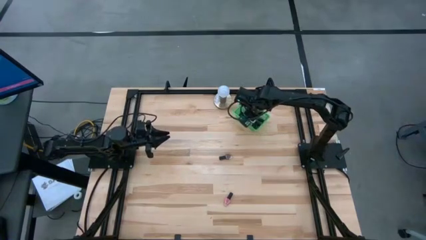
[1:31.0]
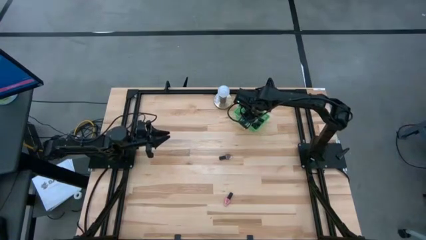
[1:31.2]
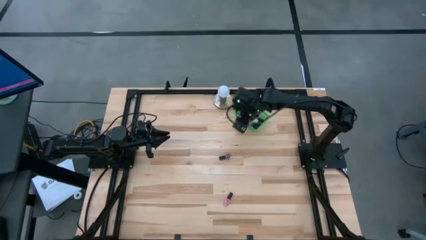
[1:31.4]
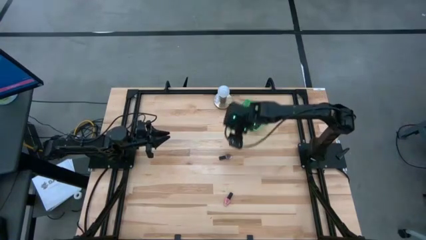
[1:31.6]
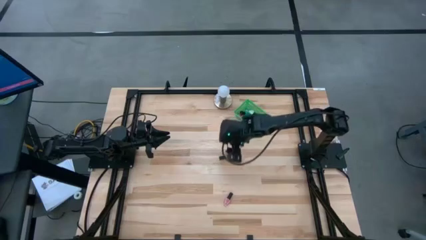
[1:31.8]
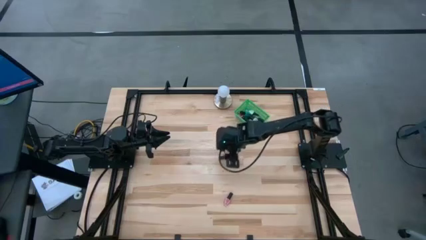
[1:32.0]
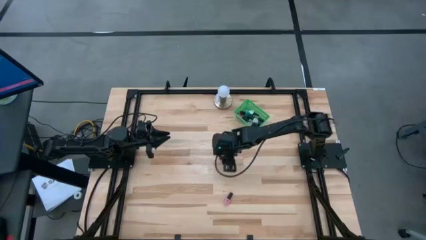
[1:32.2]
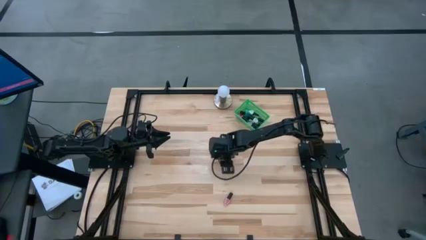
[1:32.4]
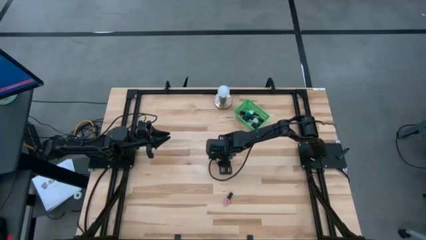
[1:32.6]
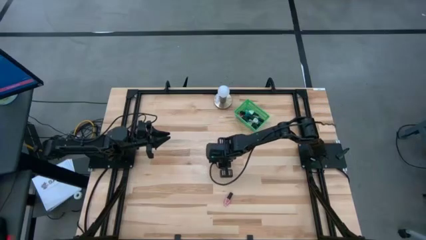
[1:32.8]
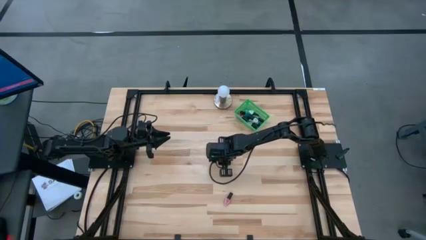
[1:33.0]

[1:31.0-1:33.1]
Task: Pick & Place Nail Polish
Put the brown nail polish bottle into the green bin

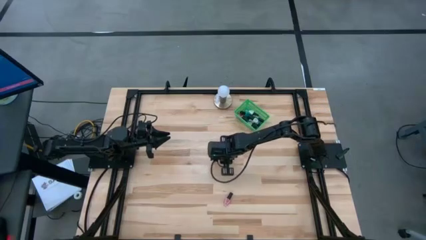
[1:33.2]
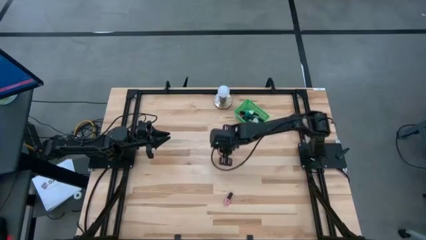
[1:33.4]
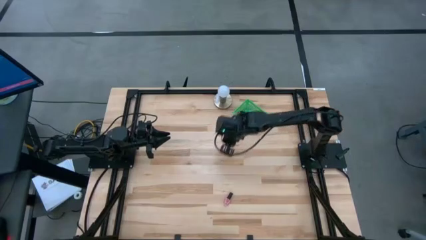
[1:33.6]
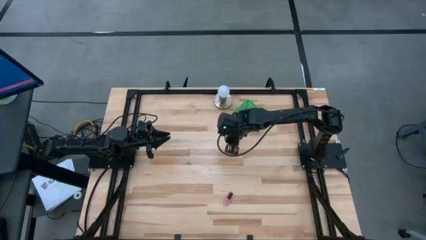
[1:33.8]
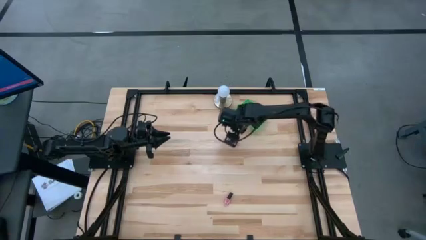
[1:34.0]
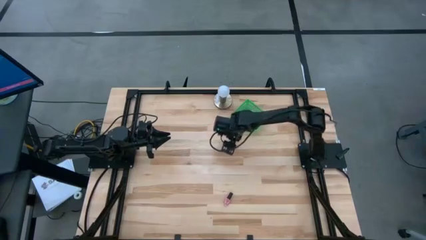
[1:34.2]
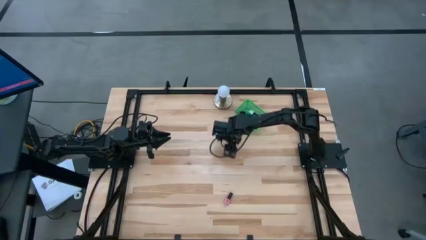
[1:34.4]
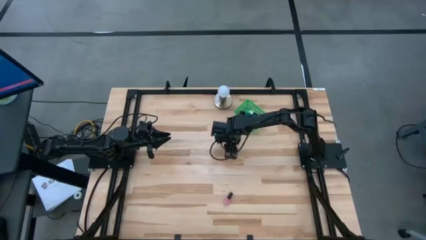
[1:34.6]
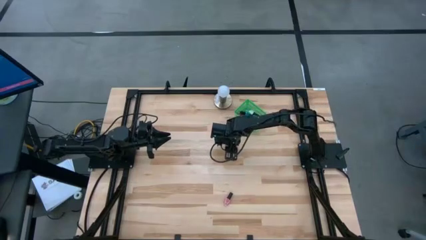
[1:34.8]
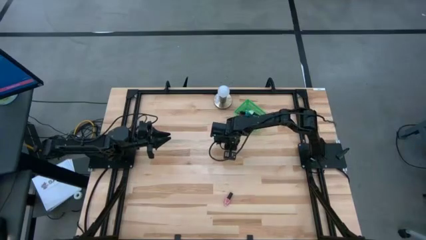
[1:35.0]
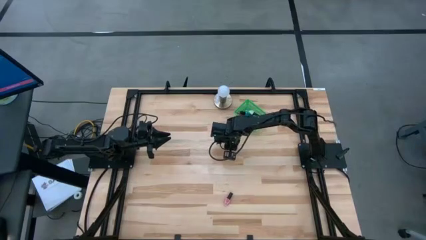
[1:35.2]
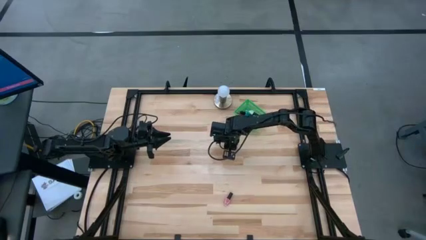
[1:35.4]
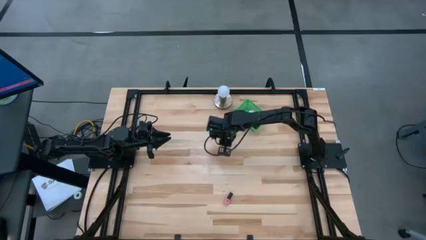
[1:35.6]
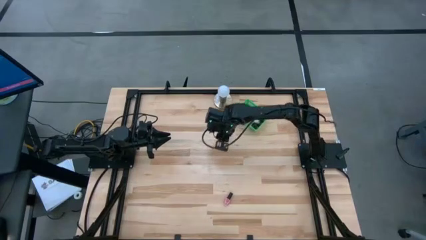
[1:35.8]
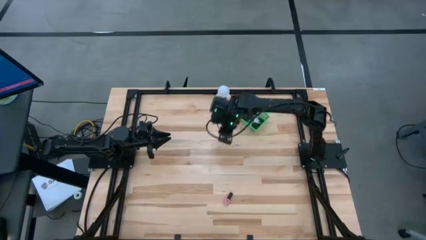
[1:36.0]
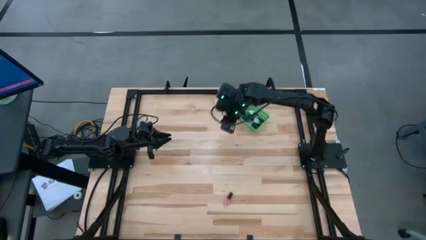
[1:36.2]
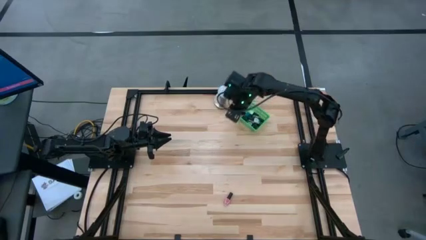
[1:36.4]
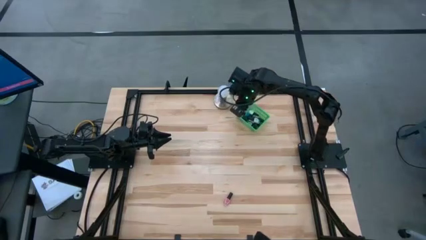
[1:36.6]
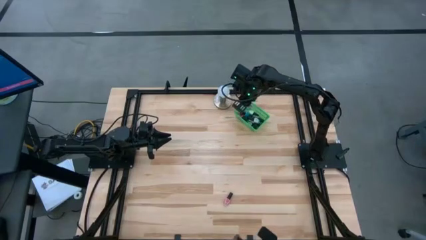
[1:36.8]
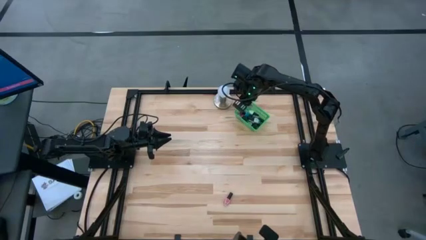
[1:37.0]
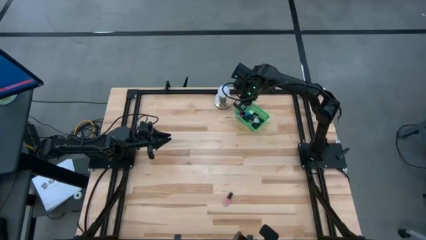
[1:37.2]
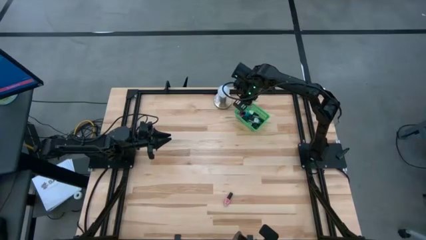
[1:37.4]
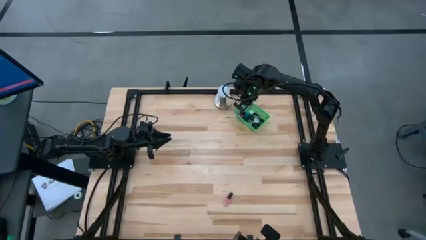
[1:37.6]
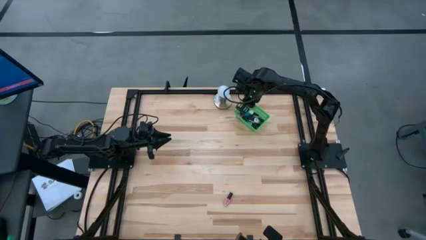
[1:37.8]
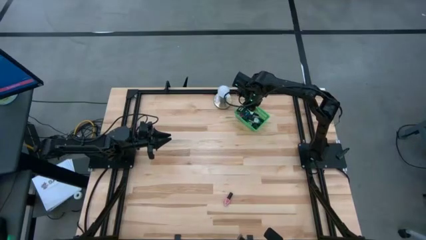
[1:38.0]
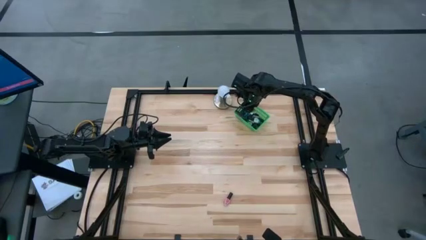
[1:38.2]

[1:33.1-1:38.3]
Put the brown nail polish bottle into the green bin

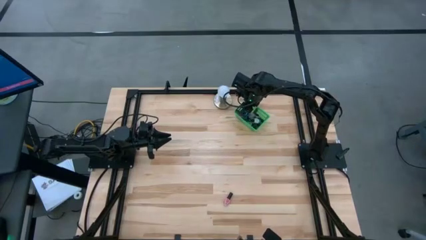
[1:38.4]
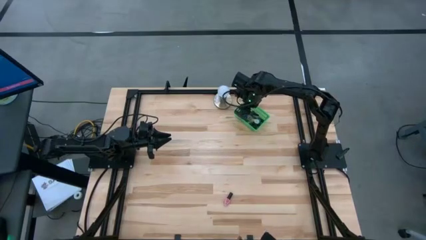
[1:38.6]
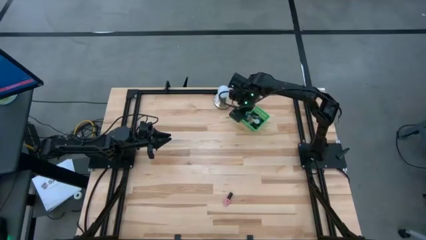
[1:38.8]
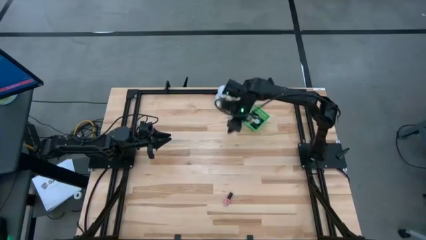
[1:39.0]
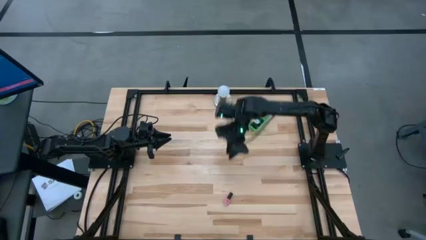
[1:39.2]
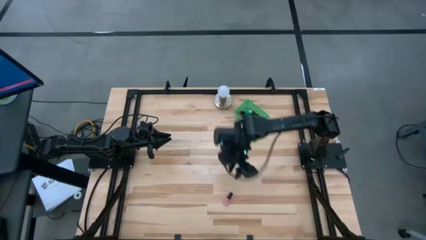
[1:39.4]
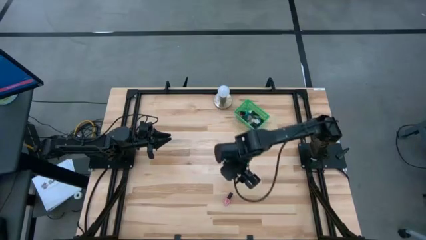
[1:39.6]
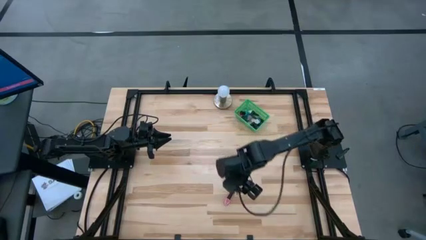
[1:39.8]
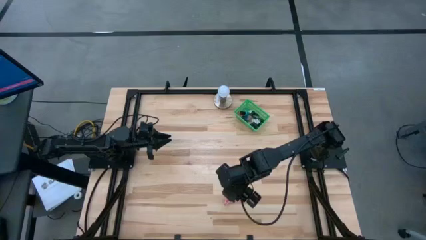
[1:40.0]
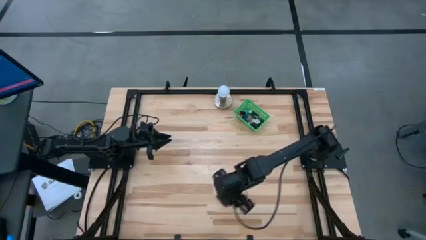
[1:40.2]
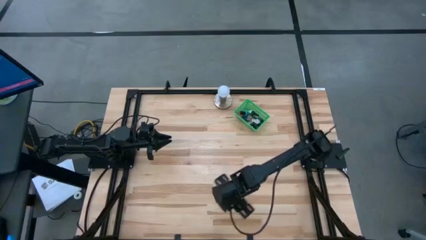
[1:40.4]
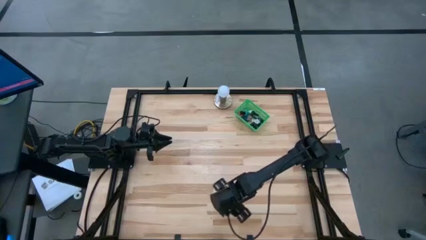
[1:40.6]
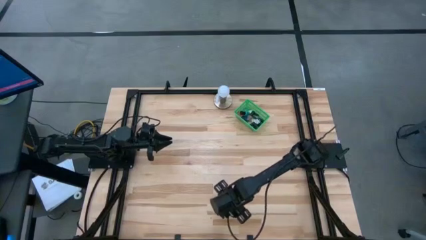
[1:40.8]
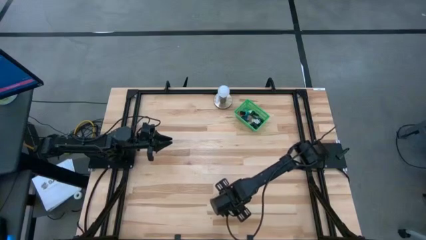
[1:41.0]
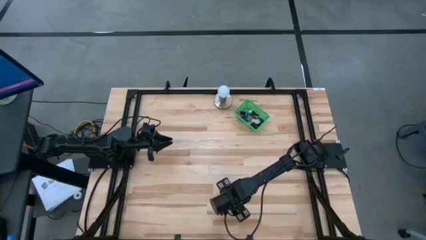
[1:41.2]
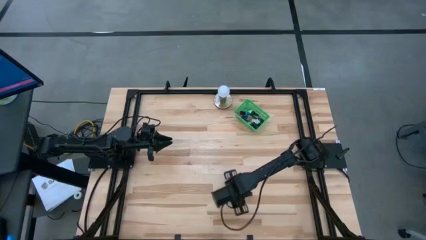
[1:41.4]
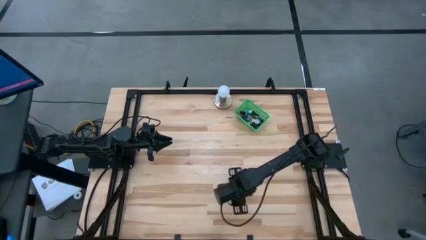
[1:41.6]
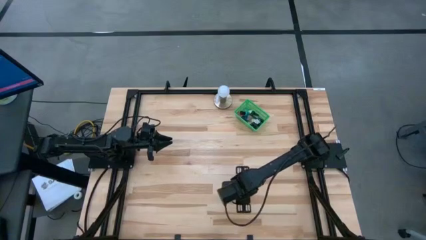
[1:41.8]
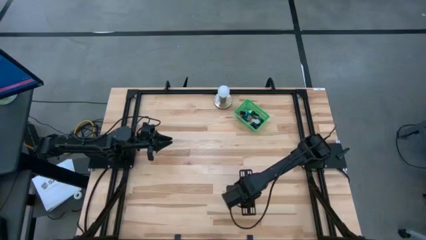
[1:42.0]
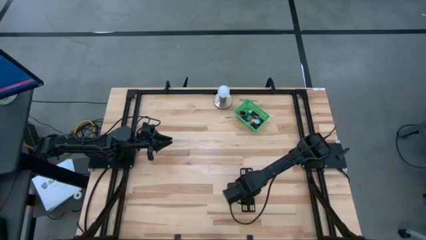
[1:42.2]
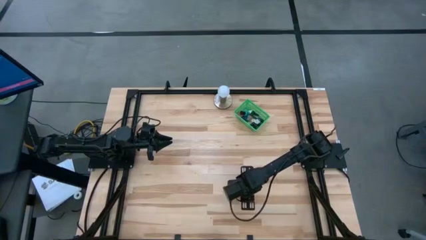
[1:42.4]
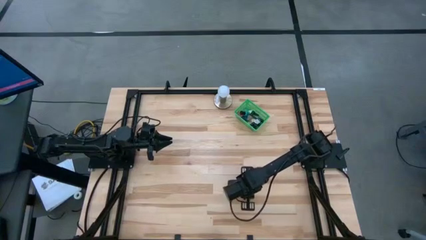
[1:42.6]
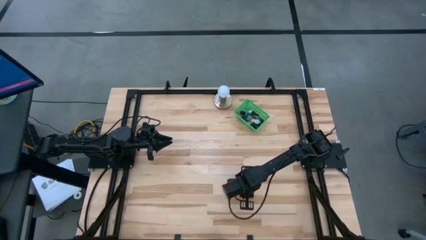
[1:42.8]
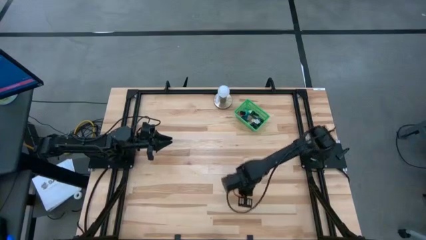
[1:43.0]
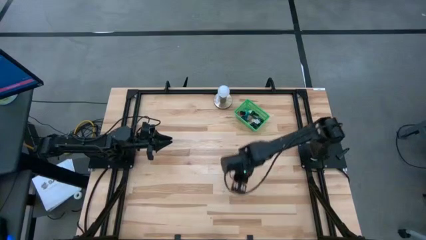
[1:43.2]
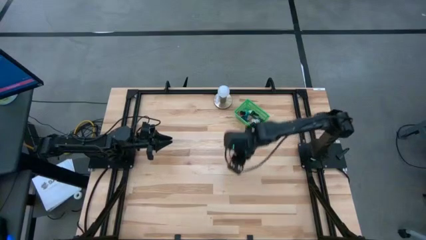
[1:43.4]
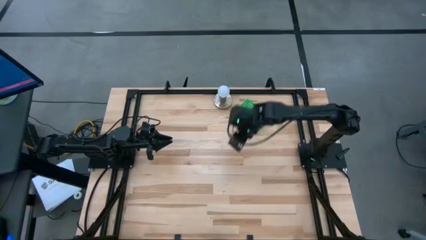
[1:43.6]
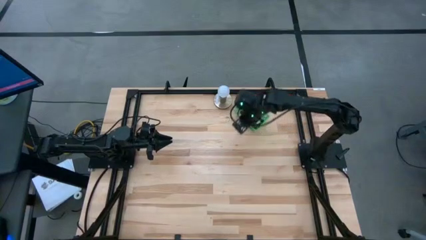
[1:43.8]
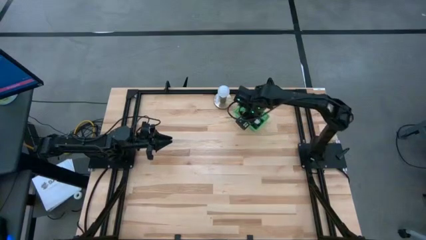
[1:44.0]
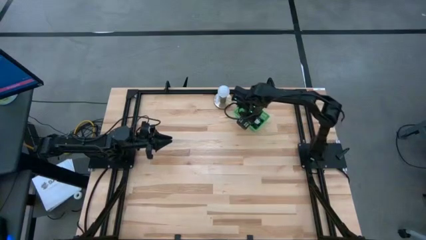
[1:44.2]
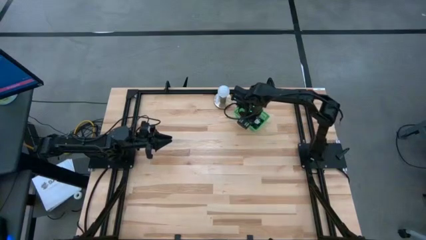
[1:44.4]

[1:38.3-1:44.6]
Put the pink nail polish bottle into the green bin

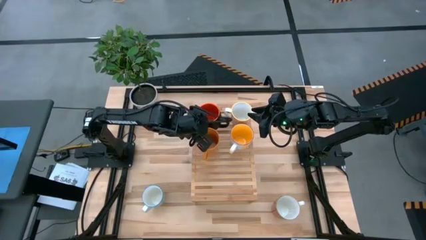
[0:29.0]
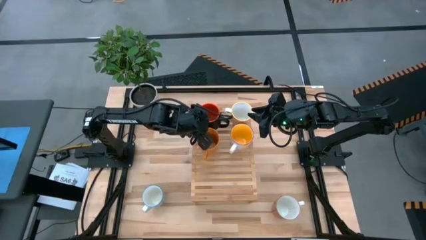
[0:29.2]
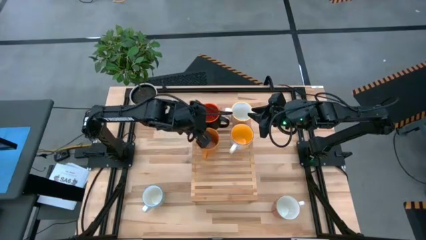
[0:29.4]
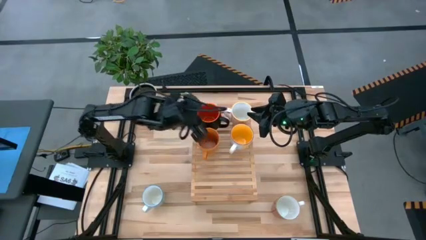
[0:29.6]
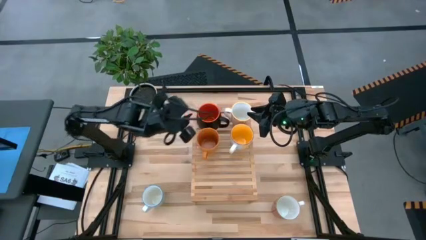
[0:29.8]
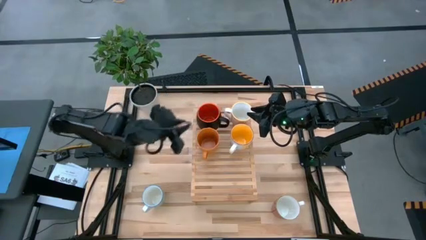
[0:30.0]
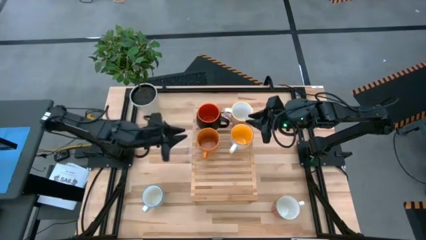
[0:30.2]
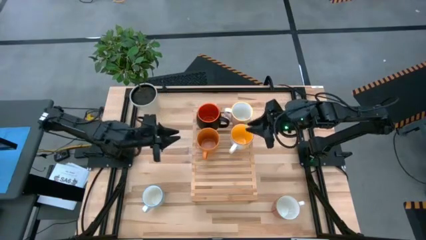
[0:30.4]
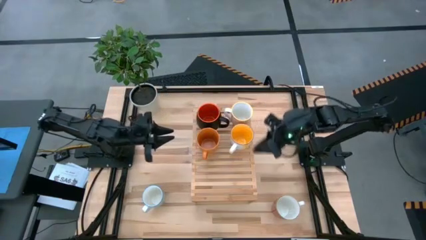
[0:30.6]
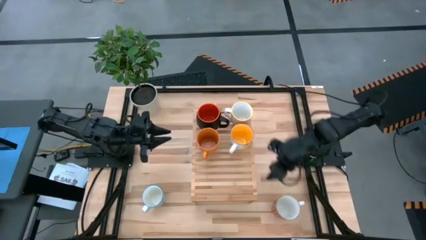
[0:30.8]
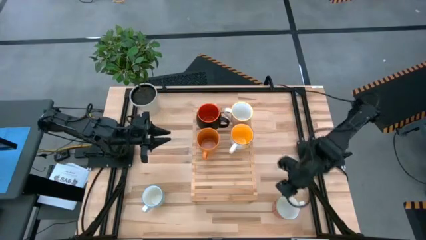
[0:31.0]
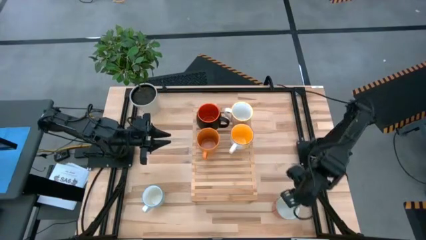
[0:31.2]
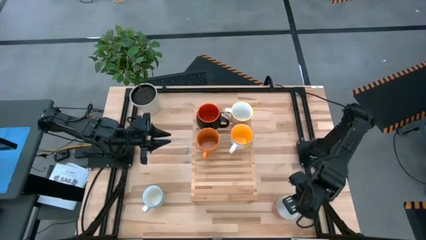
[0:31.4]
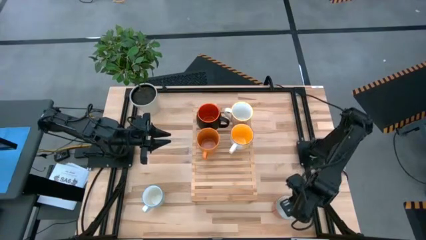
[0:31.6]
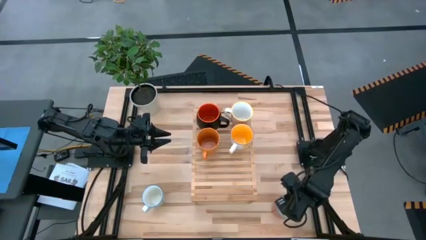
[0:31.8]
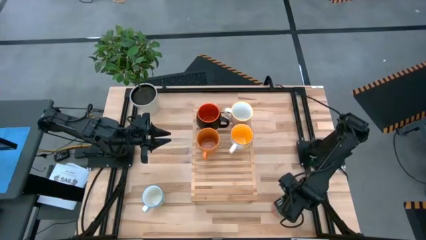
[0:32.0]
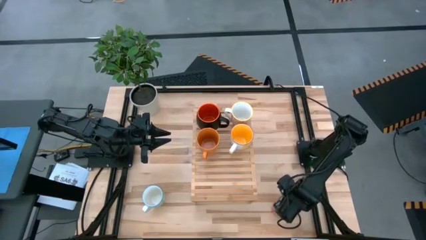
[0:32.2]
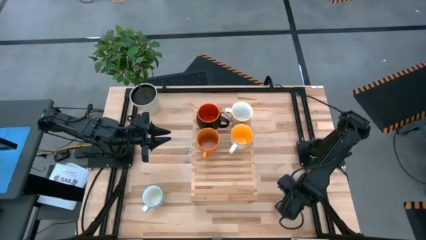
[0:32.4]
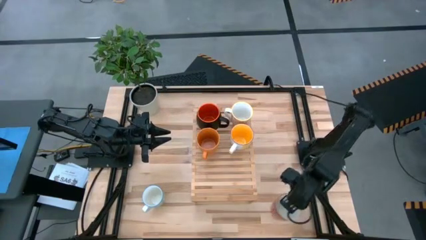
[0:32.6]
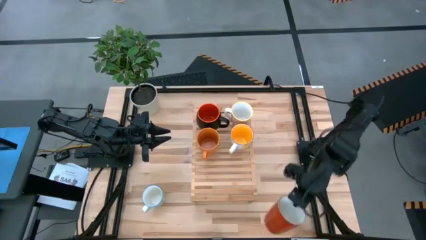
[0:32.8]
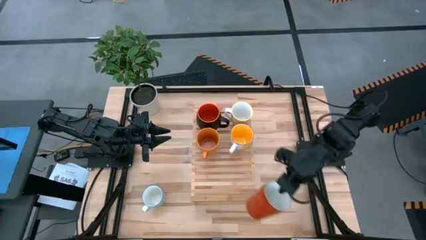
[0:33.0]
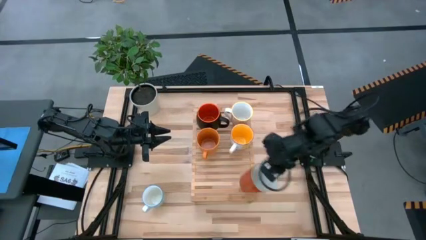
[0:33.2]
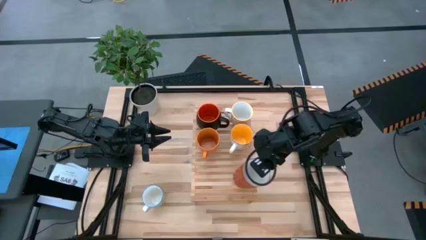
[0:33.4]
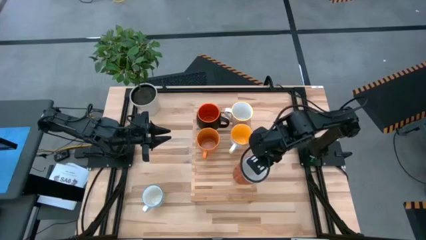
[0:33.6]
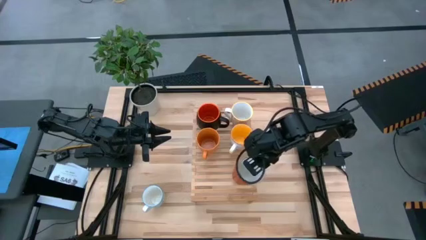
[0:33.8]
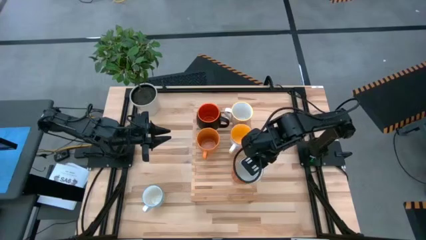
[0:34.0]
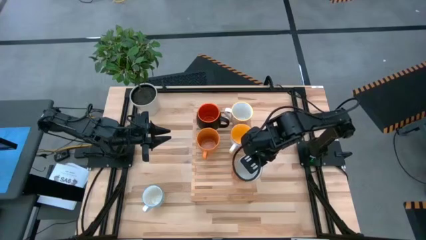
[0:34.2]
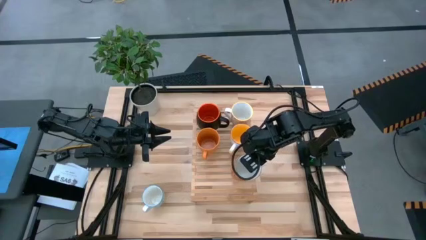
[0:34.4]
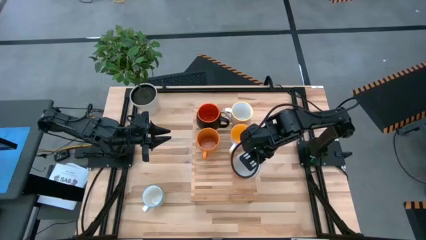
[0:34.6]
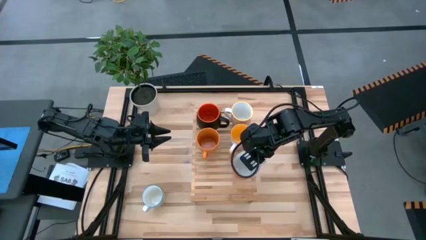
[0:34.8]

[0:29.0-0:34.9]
Task: Place coffee mugs
Put the white orange mug on the shelf
